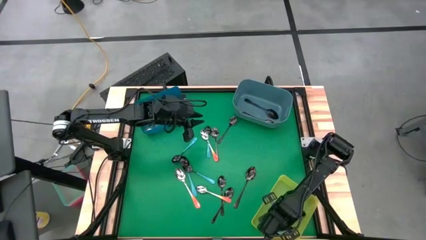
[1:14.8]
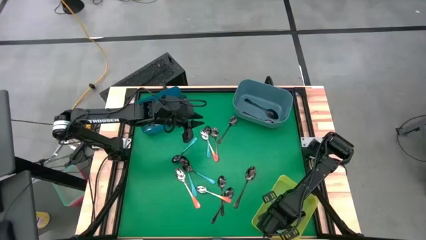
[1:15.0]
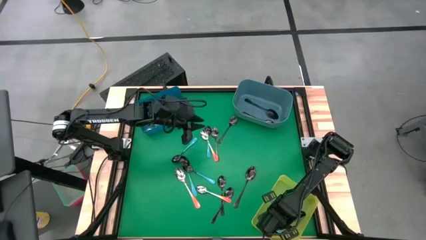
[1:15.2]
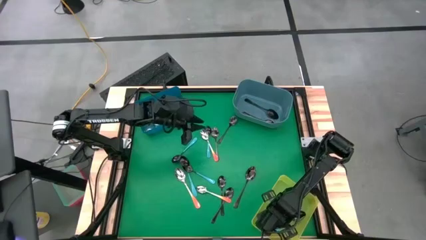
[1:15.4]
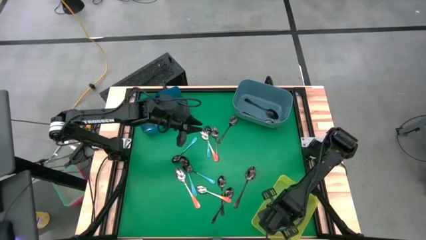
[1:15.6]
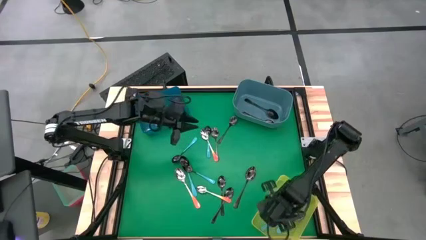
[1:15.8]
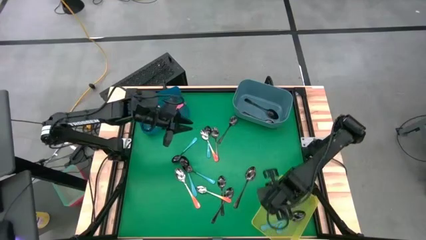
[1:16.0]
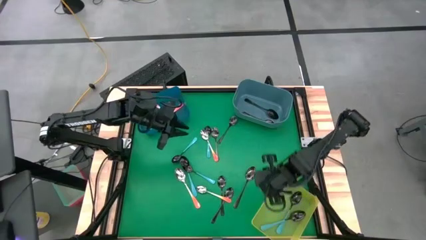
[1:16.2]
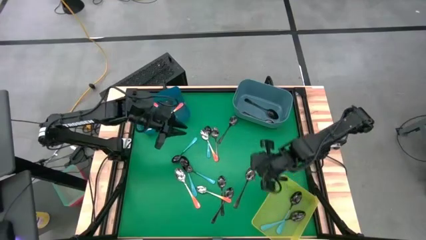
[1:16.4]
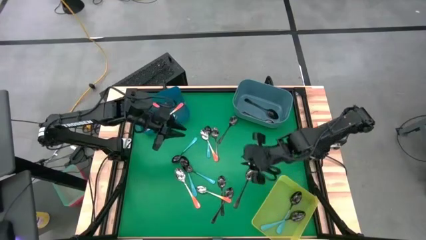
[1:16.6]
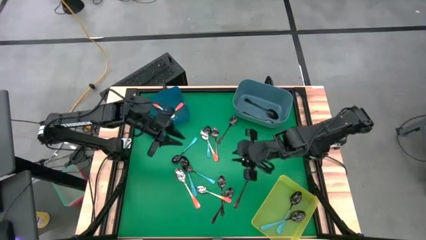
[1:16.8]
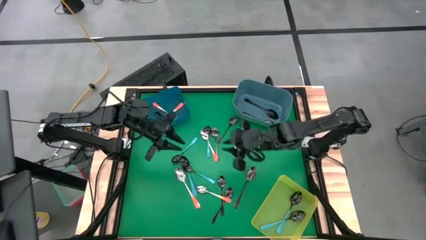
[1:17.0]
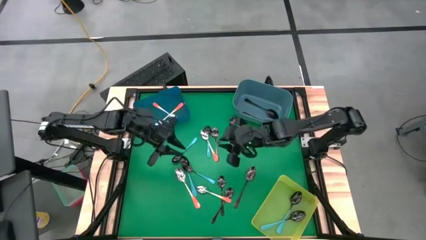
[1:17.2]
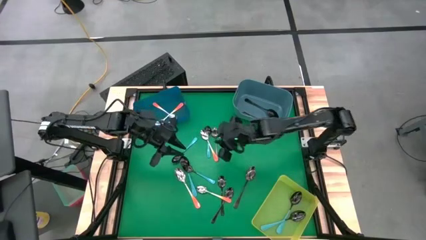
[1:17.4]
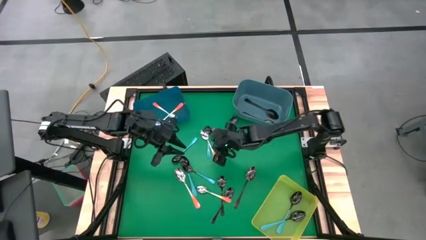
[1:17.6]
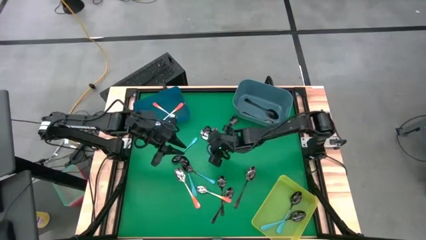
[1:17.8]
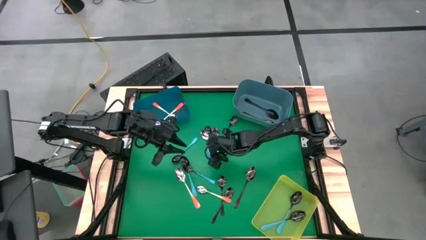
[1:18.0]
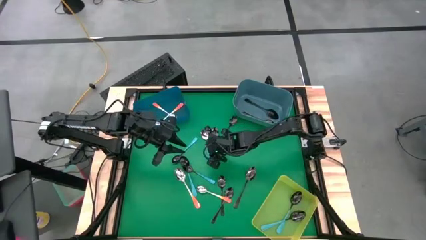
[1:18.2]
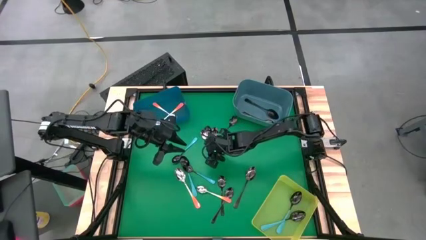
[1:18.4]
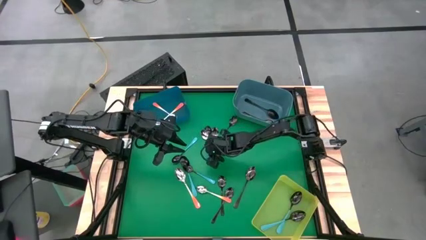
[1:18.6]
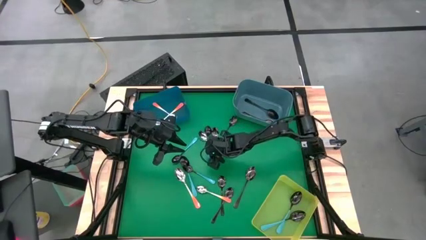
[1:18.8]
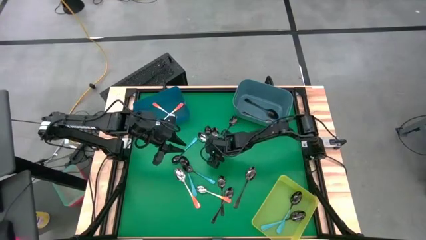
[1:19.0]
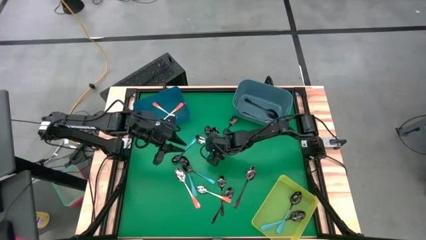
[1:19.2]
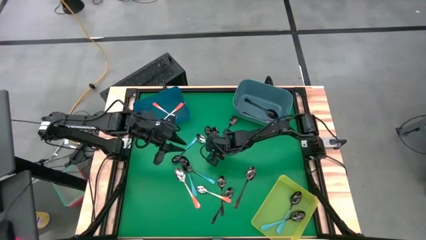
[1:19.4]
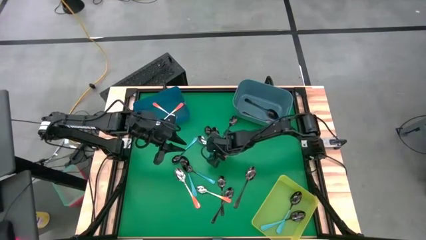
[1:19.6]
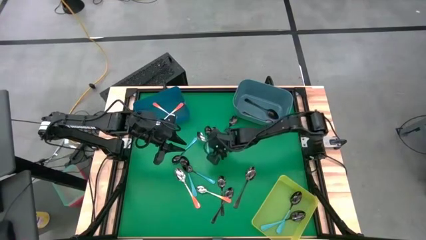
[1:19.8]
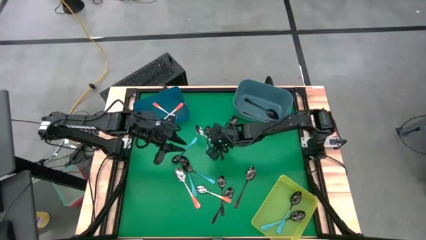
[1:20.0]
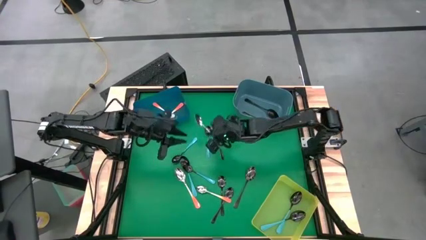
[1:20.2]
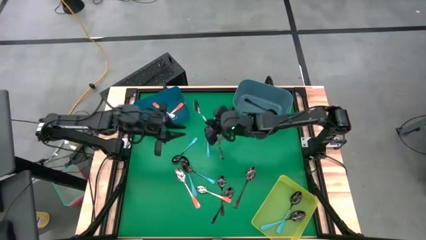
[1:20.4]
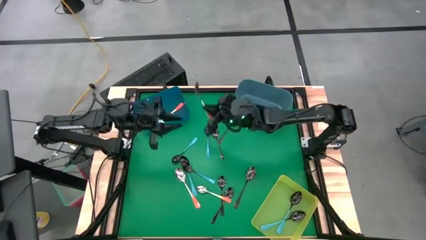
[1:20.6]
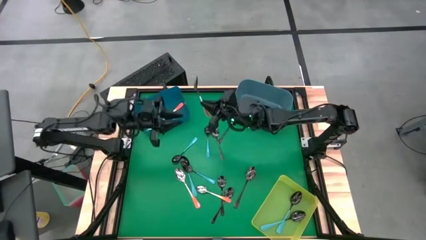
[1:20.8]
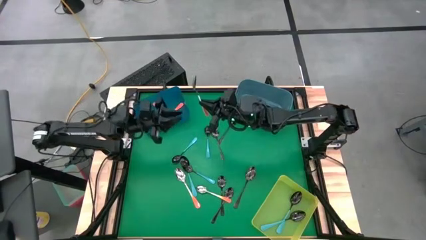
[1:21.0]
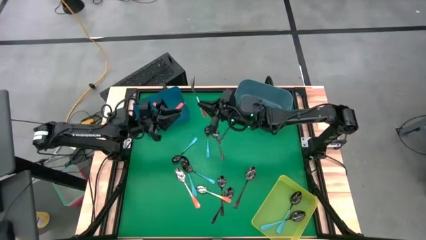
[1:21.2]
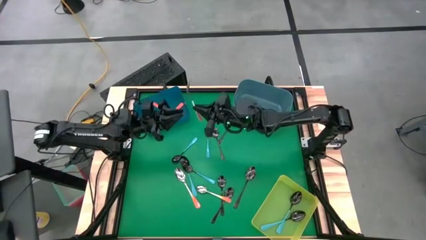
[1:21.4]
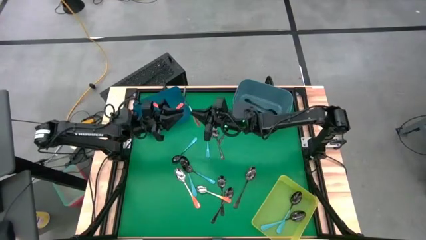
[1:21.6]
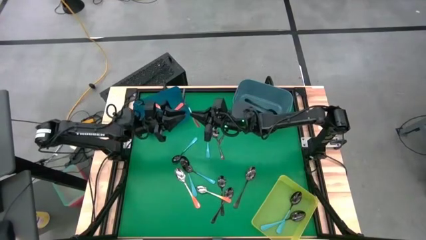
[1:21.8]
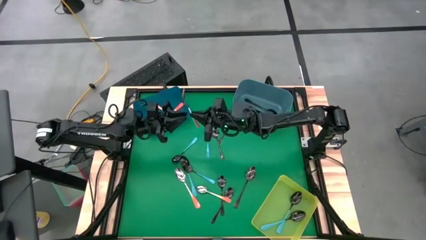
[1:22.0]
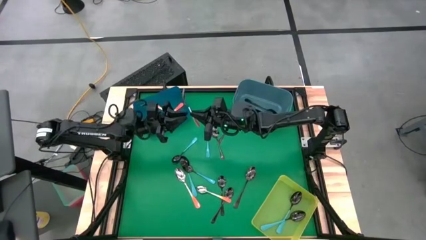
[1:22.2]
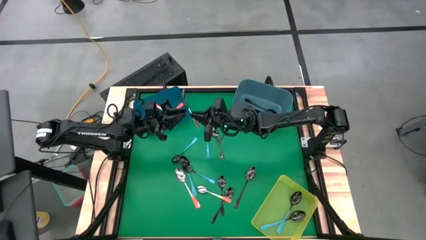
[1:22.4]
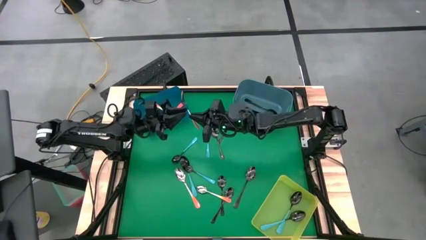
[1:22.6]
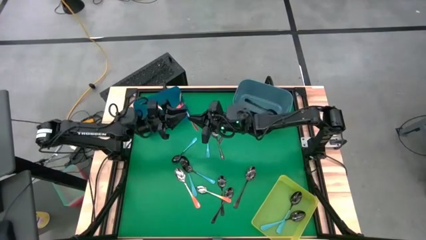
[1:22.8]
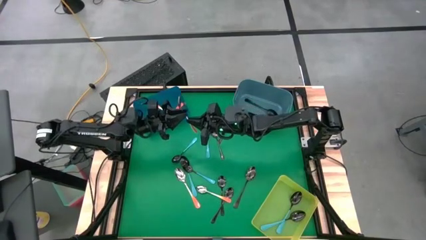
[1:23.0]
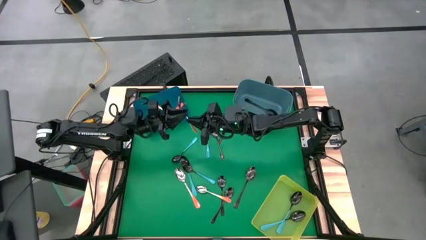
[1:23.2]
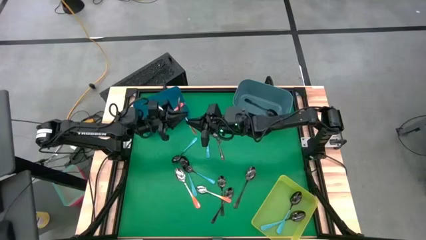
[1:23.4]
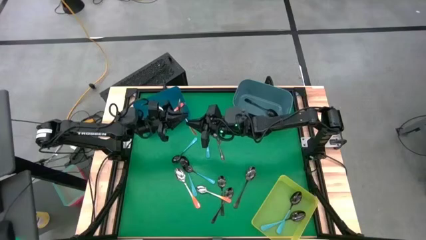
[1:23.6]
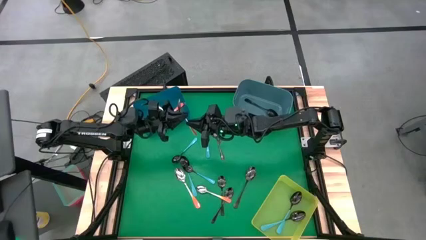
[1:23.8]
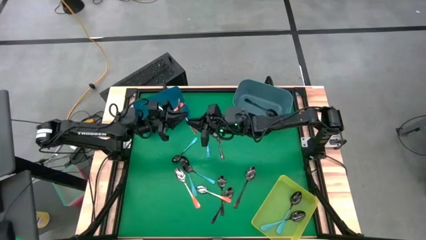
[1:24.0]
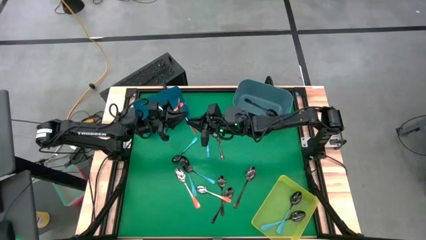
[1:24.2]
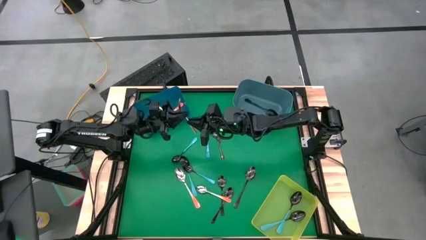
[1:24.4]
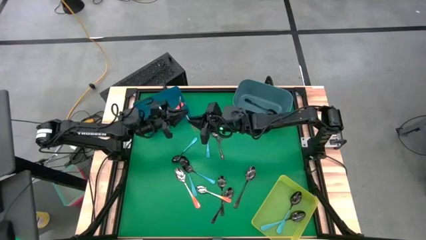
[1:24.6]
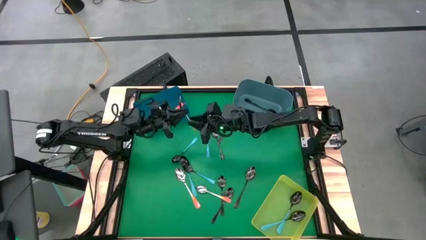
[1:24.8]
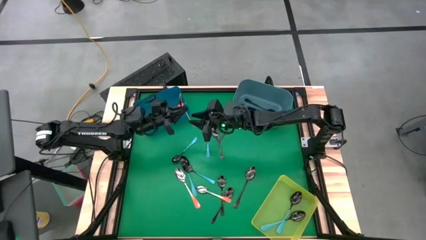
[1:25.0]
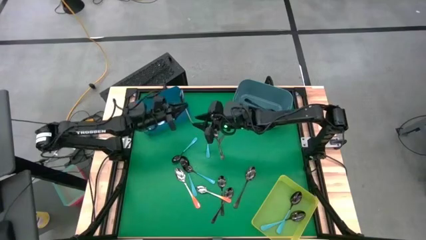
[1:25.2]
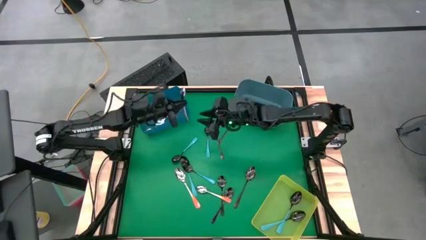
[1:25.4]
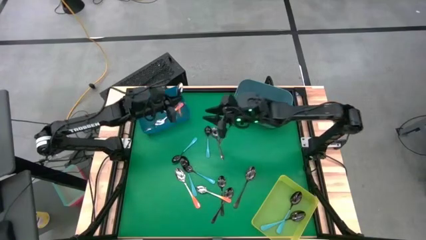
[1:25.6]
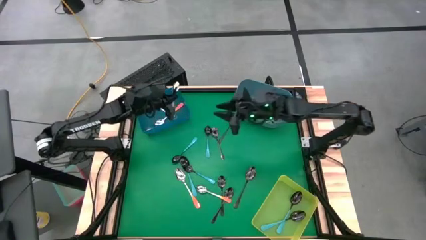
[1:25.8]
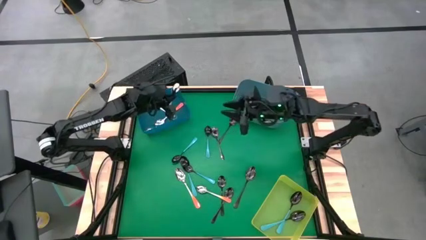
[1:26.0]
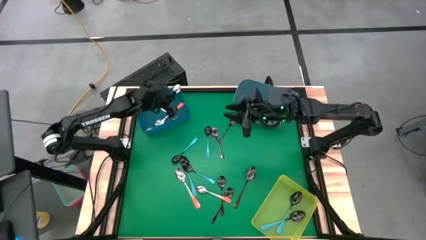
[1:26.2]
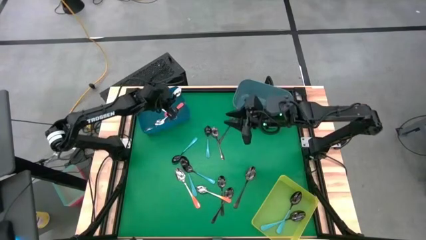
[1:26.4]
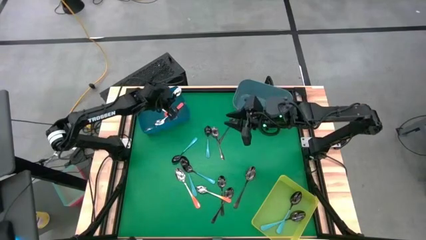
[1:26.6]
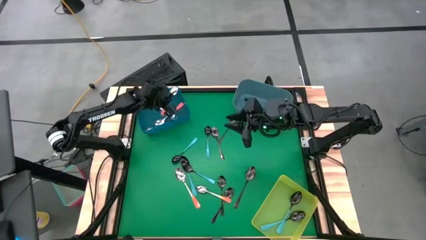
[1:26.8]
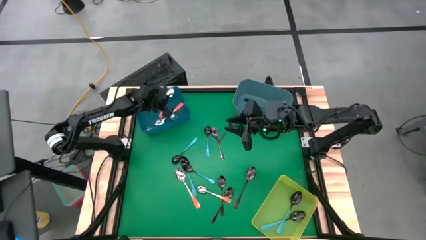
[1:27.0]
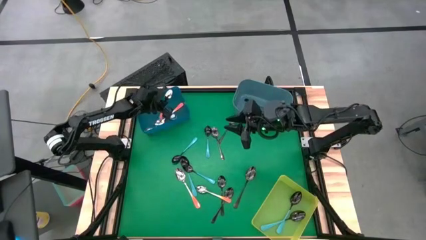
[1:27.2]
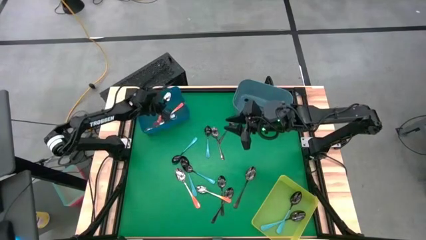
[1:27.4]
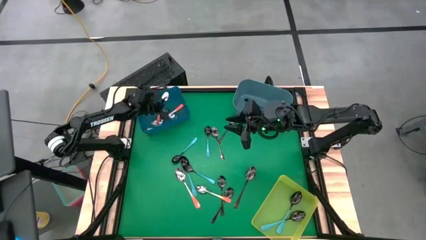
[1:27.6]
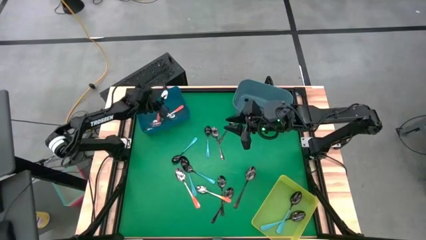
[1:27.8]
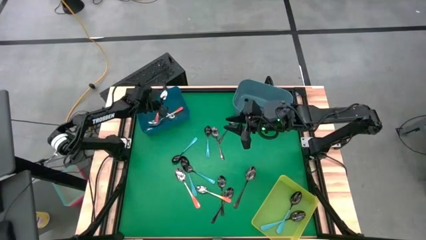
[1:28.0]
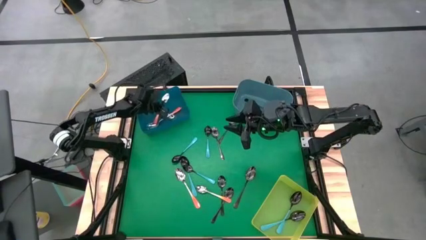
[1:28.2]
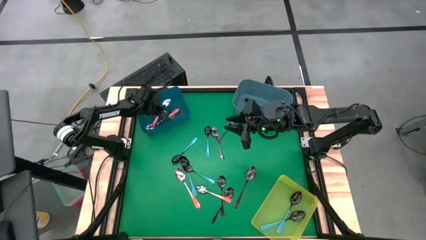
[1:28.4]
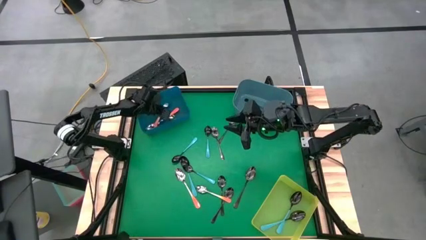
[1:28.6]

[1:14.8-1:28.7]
Task: Sort silverware by color (type)
Put the orange spoon into the dark blue bin
